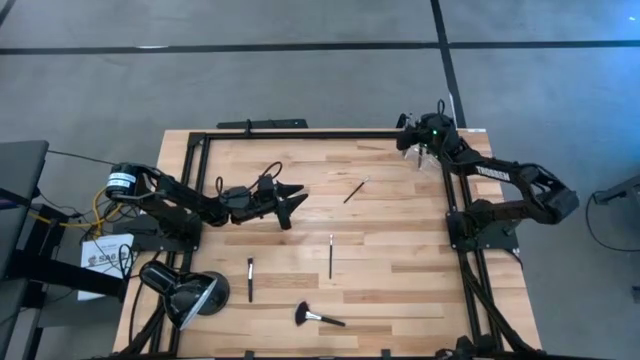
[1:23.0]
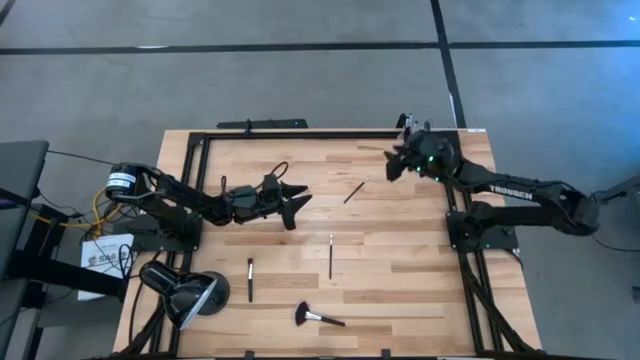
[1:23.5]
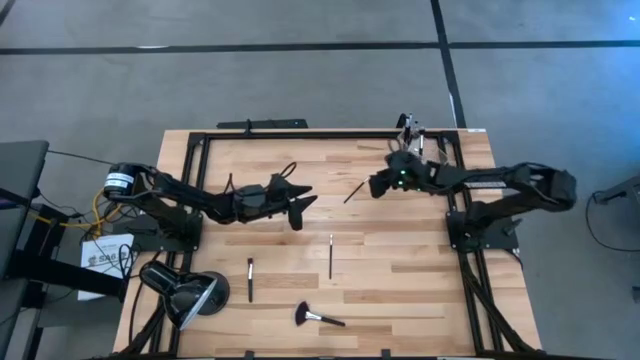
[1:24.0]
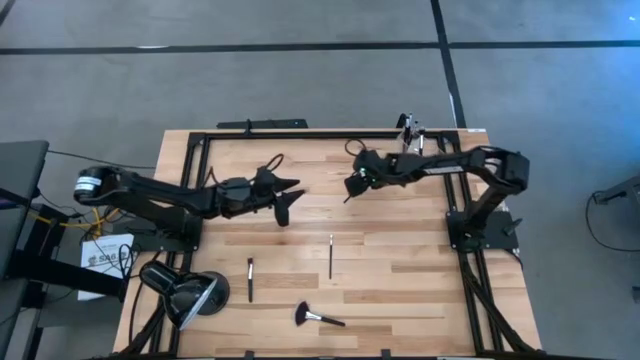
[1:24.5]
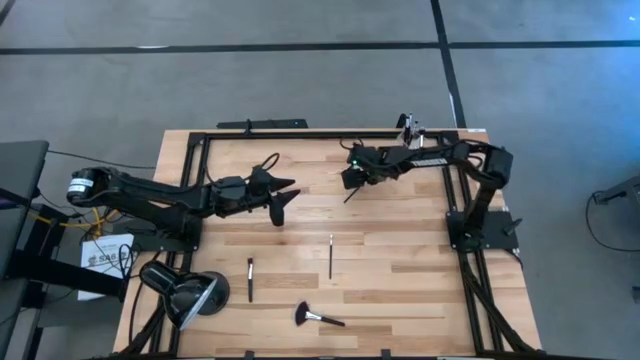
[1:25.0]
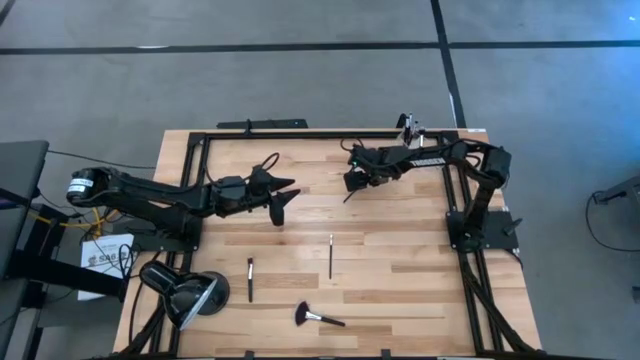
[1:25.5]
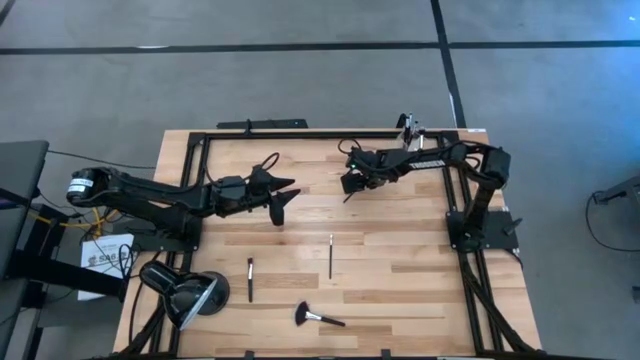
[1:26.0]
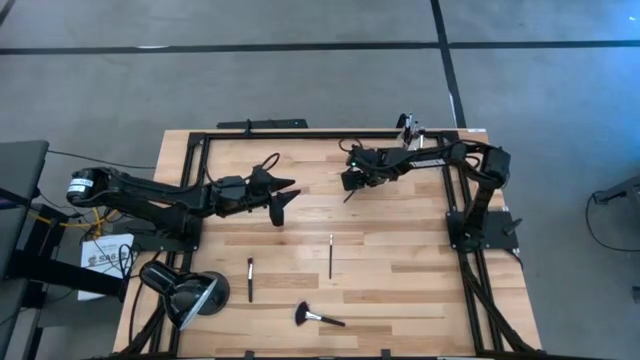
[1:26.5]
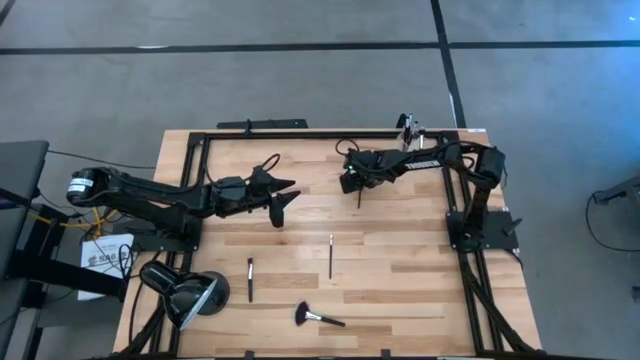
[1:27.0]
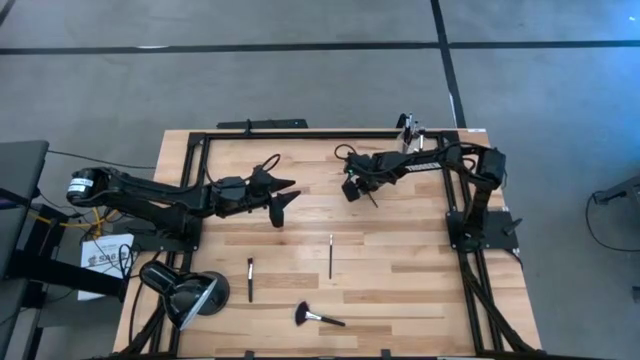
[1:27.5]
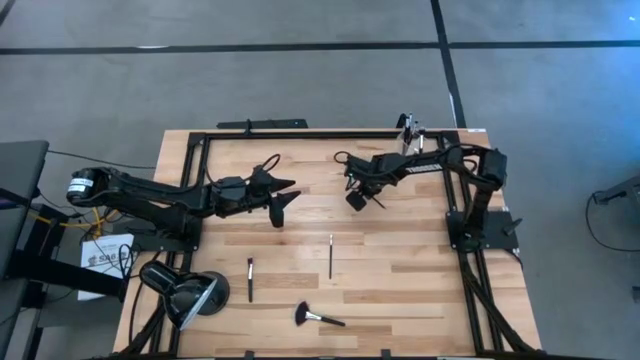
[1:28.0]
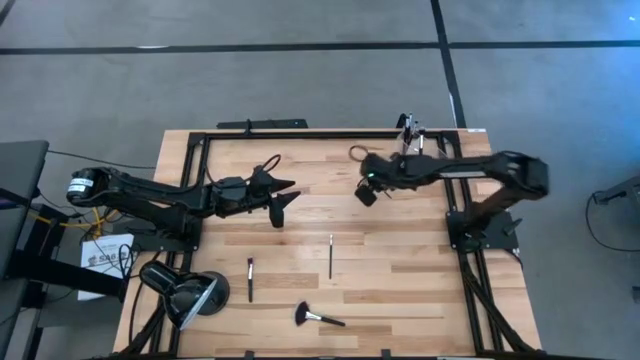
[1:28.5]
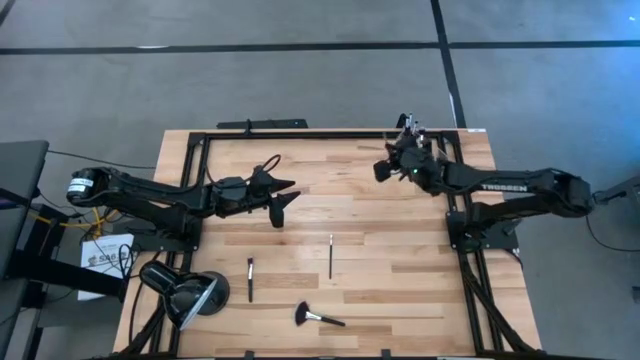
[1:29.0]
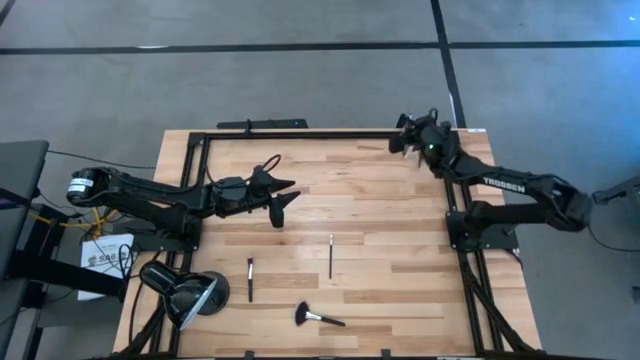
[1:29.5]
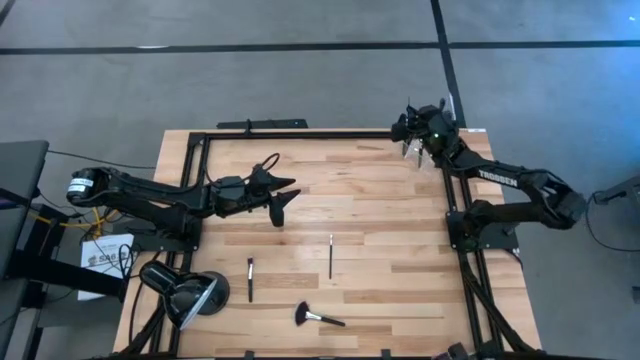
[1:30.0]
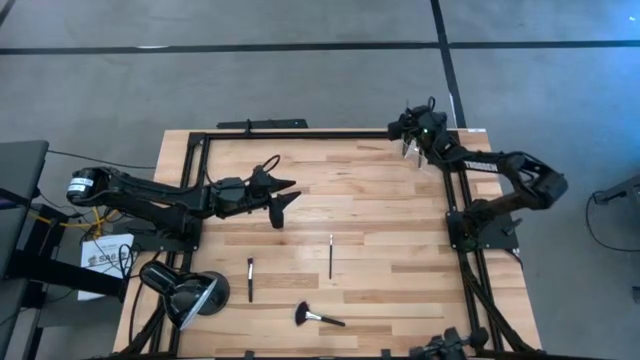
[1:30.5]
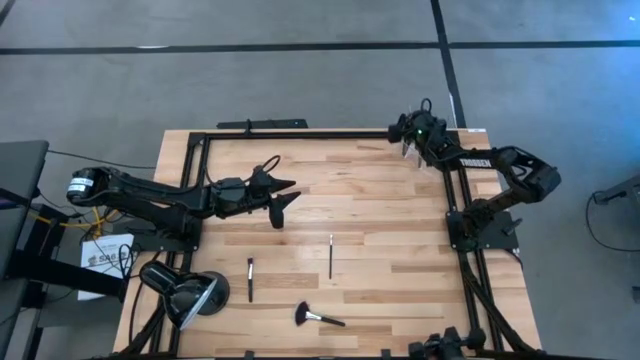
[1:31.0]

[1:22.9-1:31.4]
Task: Put items in baskets/containers
Put the black liner brush into the transparent organizer

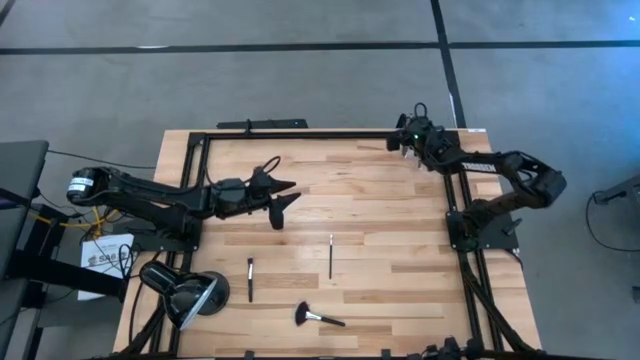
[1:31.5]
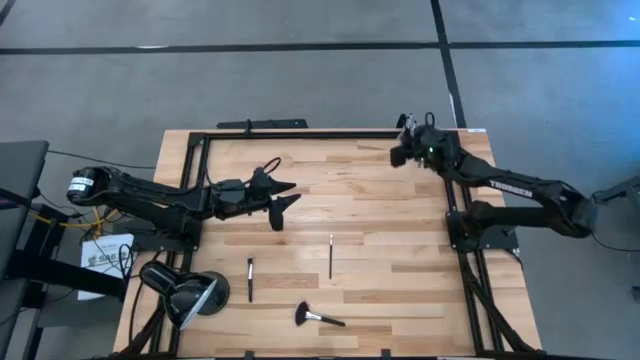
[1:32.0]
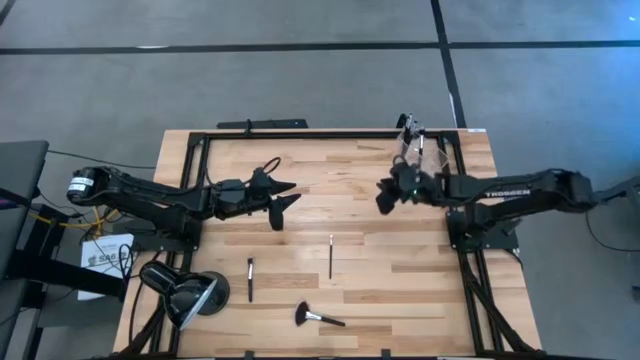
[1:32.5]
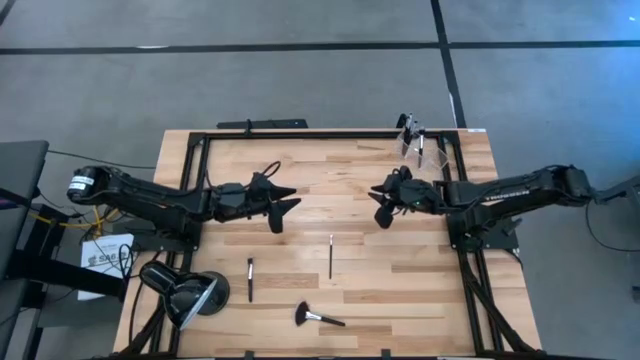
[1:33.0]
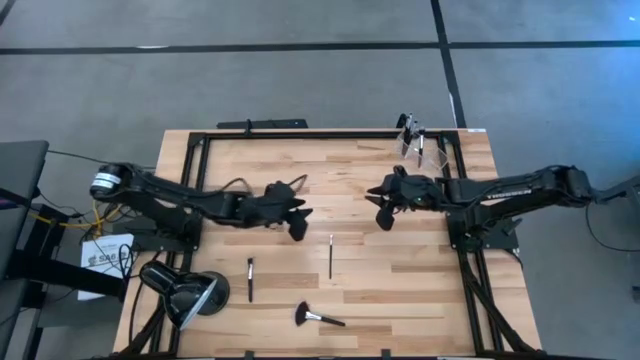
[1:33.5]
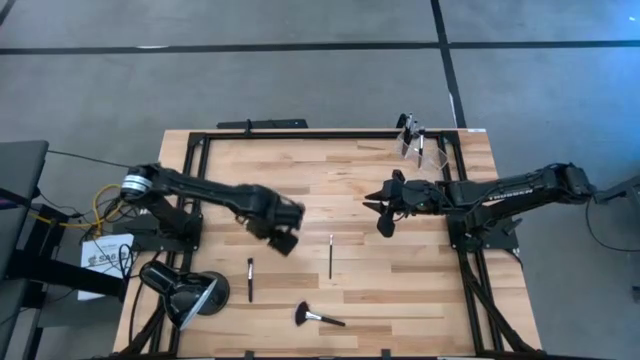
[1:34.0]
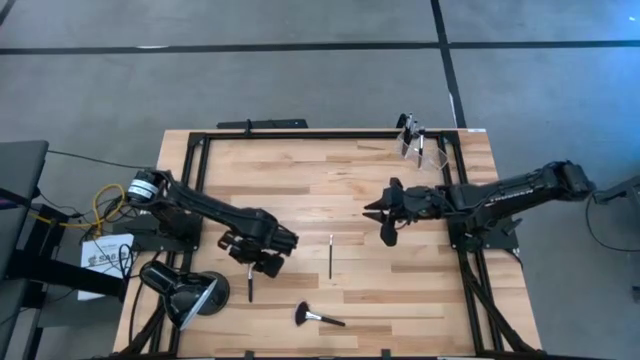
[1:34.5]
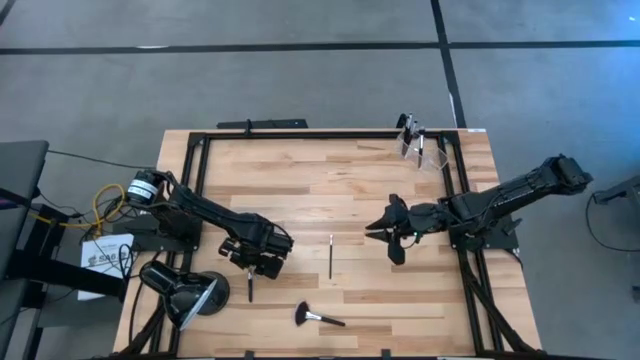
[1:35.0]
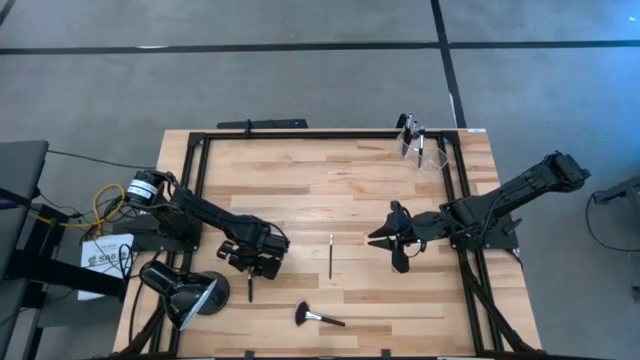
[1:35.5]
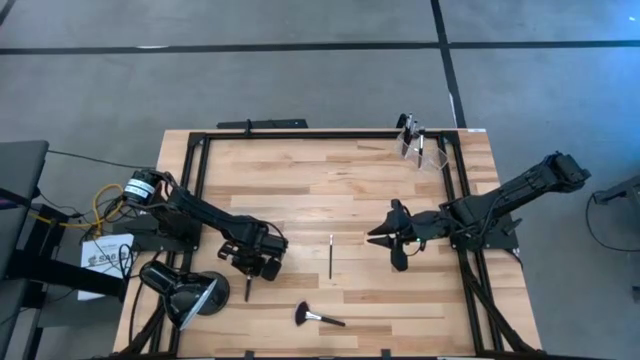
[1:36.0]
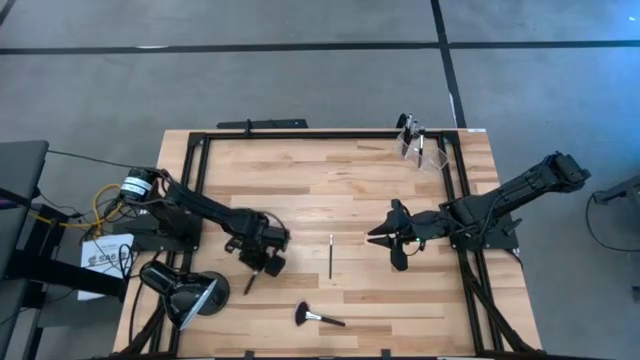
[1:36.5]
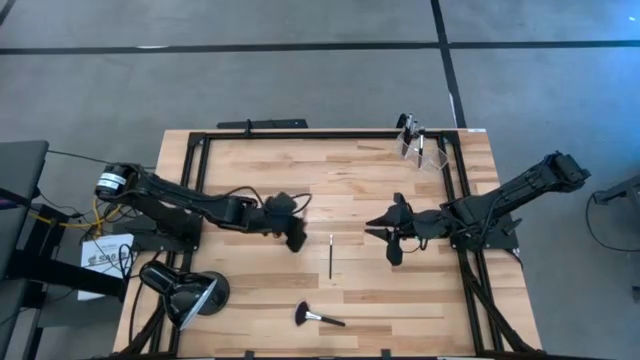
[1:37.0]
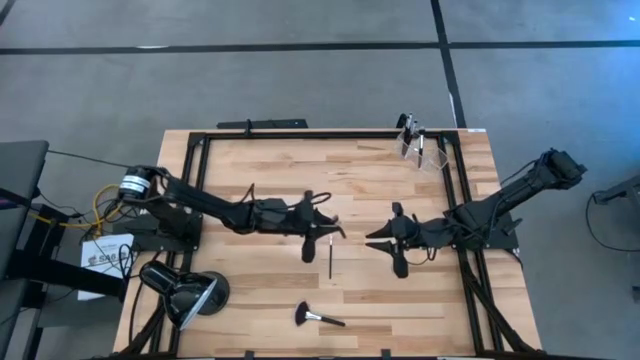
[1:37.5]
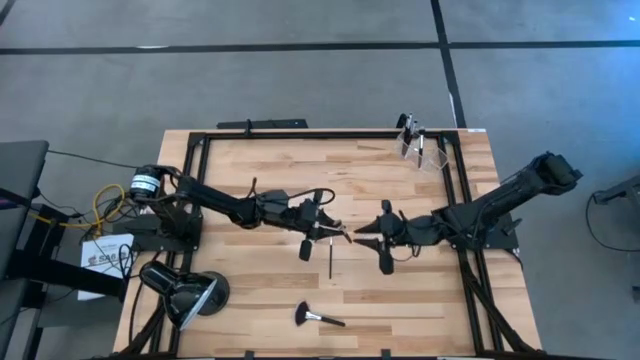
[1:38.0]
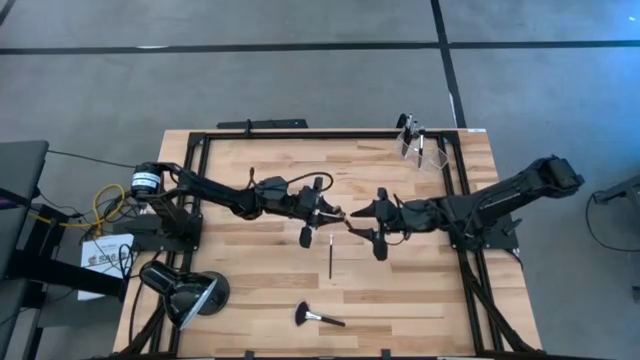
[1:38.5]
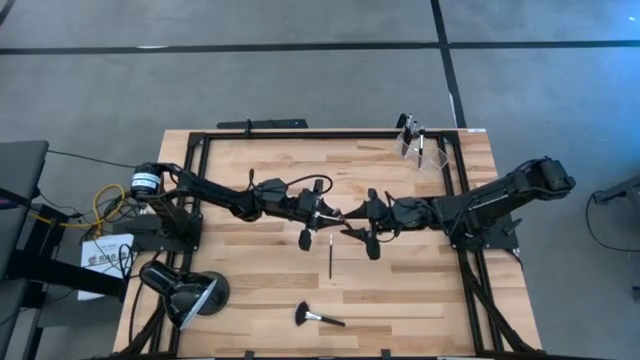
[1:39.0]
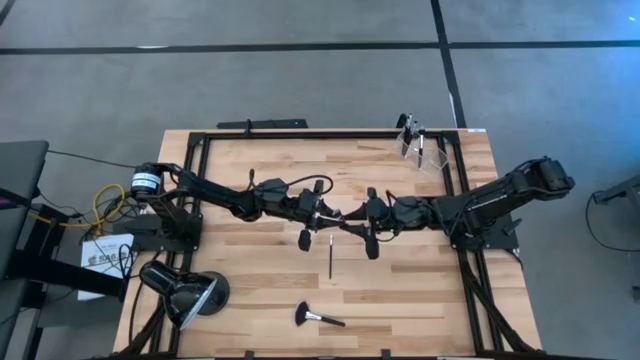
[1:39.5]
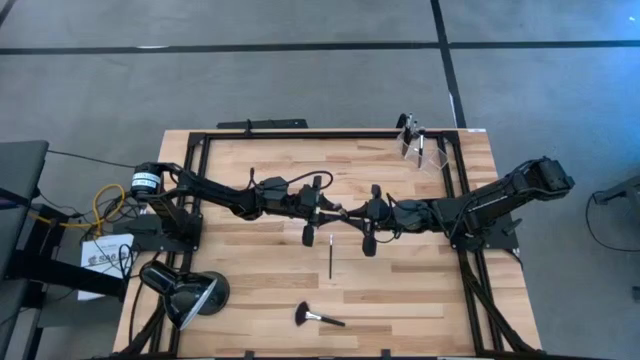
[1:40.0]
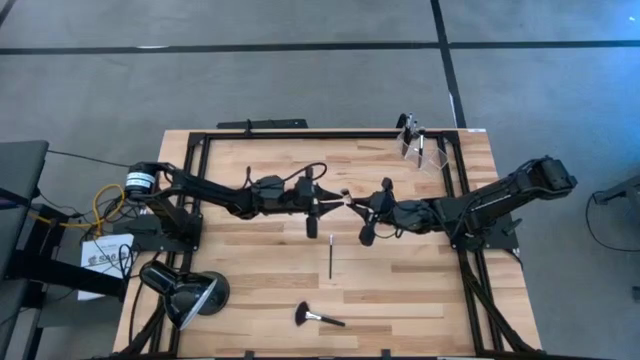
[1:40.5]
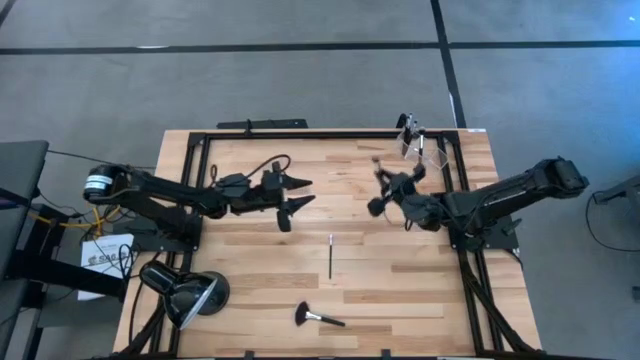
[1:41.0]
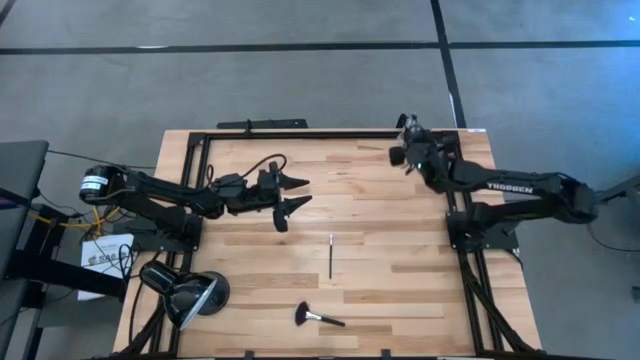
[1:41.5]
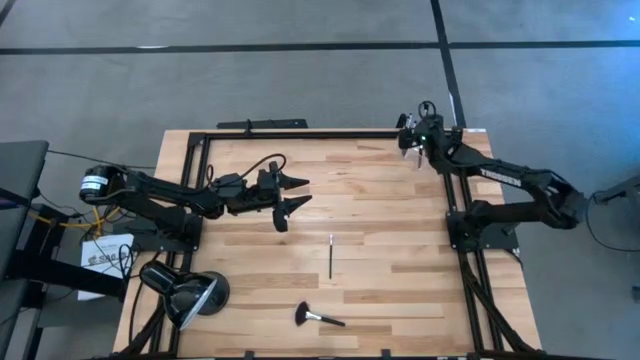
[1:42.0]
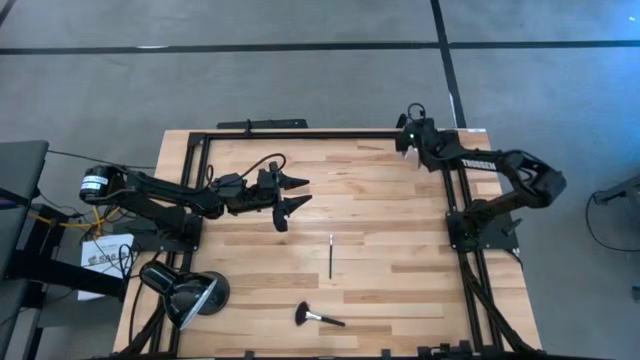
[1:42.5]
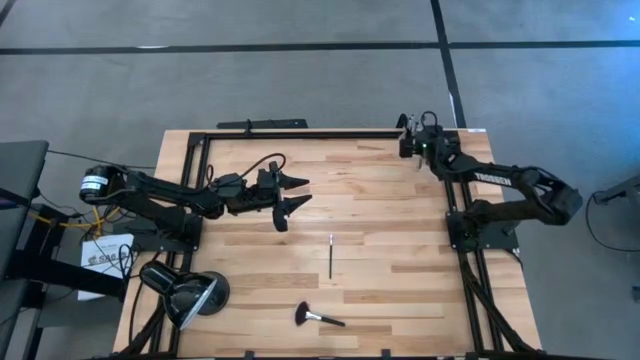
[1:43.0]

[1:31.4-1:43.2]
Put the black powder brush into the transparent organizer

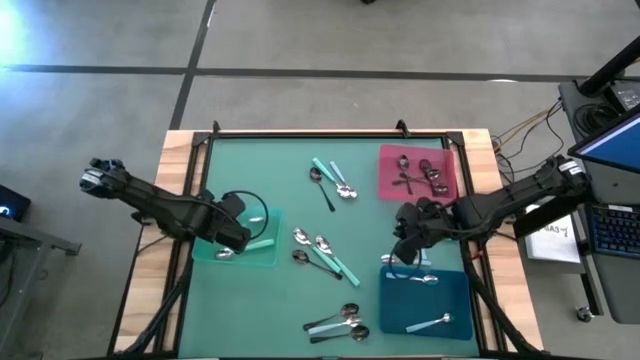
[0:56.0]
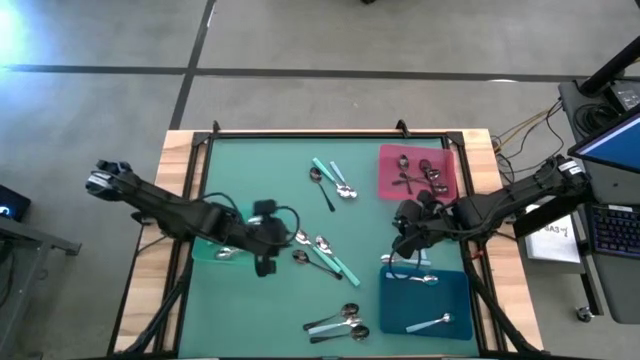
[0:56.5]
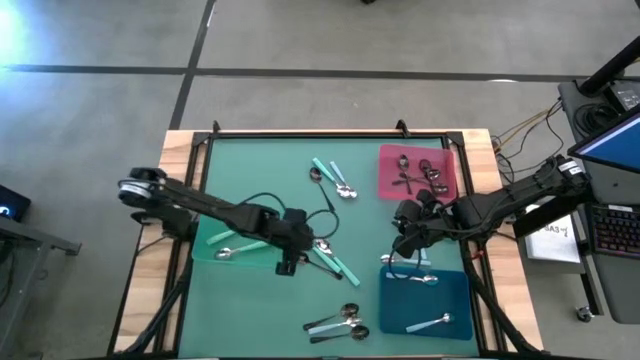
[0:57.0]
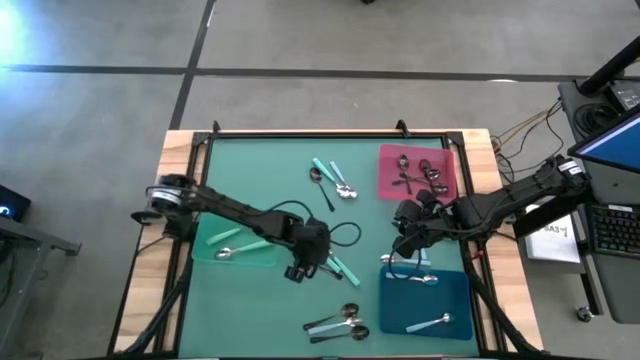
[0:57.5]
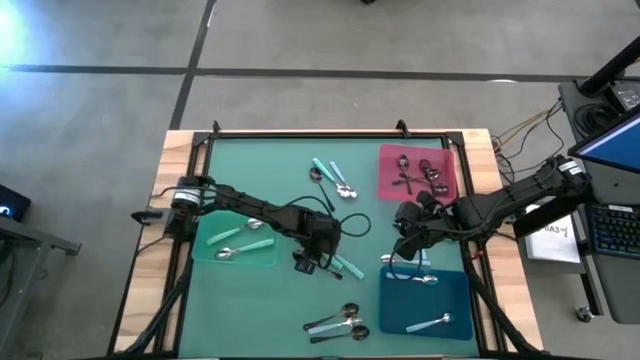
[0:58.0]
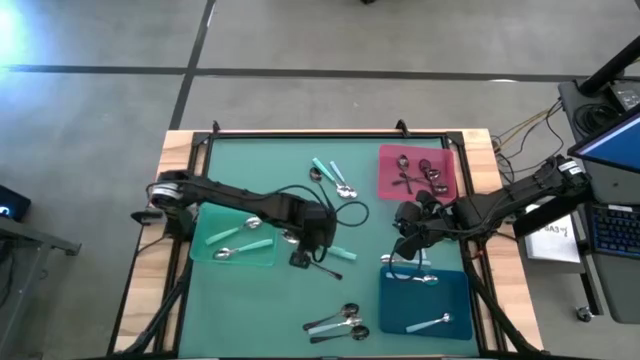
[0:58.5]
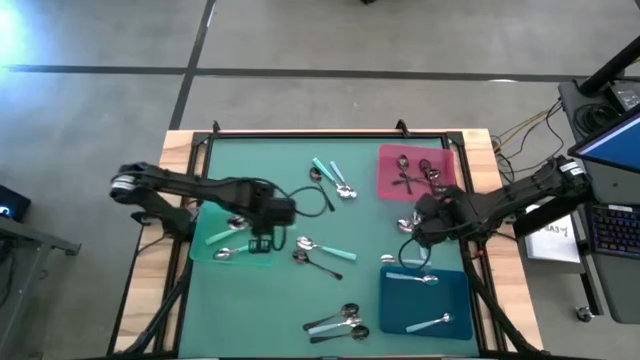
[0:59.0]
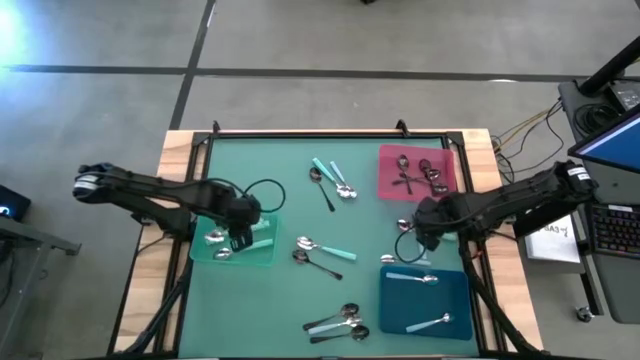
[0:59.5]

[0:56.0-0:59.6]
Task: Sort silverware by color (type)
Put the green spoon into the green bin
